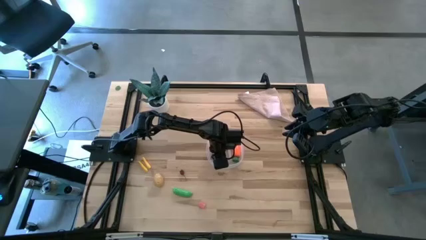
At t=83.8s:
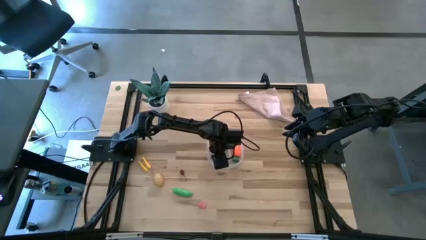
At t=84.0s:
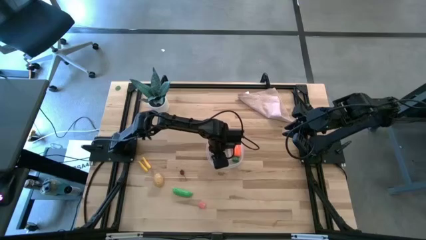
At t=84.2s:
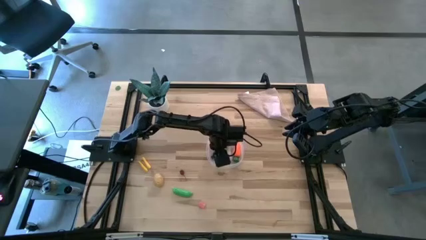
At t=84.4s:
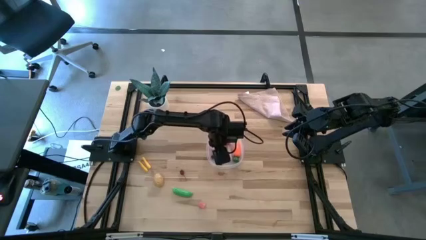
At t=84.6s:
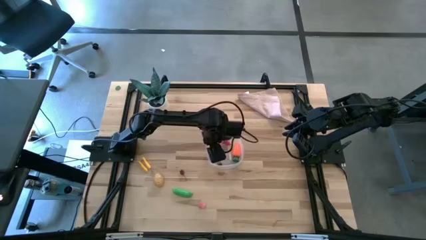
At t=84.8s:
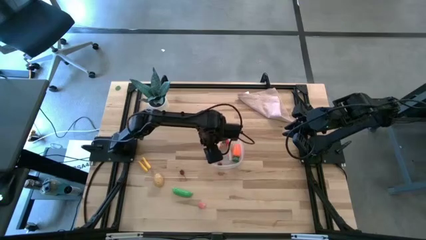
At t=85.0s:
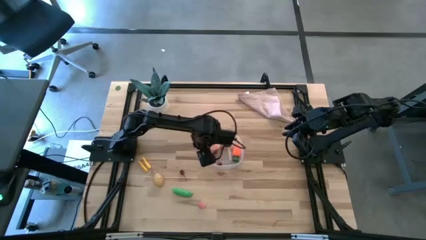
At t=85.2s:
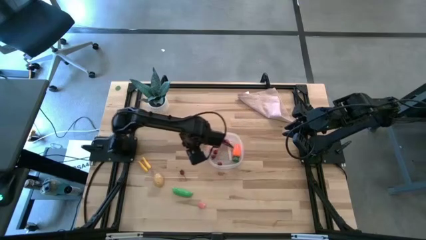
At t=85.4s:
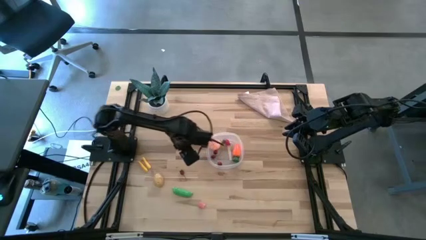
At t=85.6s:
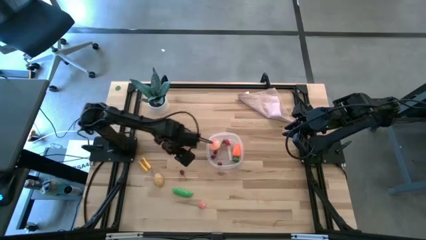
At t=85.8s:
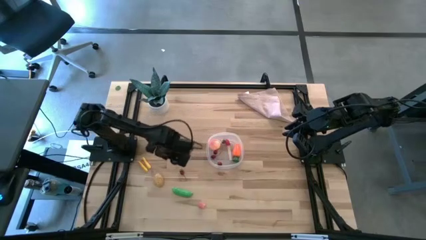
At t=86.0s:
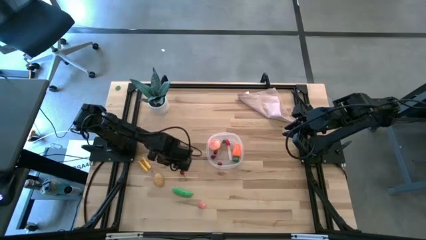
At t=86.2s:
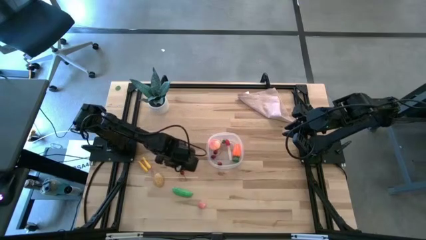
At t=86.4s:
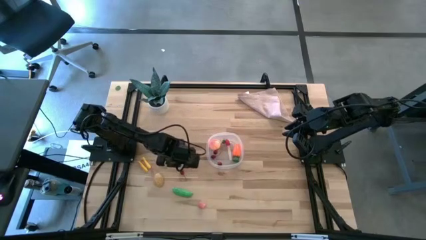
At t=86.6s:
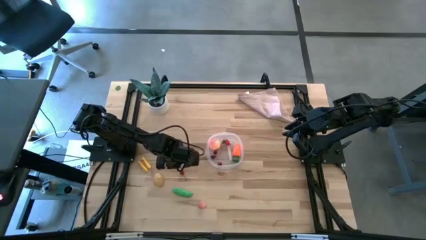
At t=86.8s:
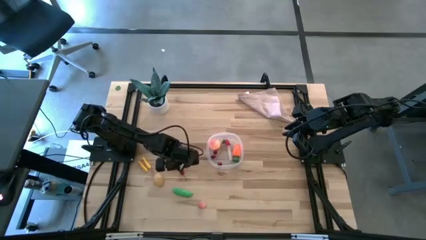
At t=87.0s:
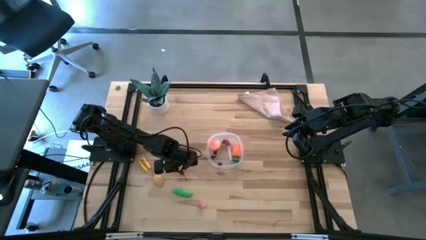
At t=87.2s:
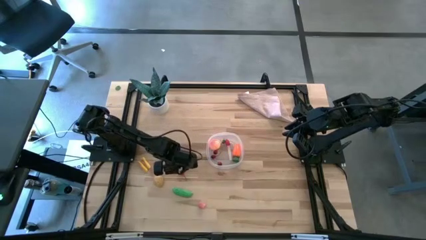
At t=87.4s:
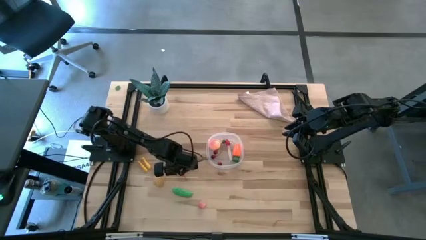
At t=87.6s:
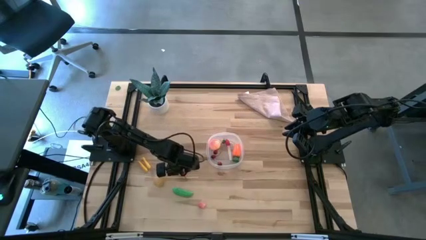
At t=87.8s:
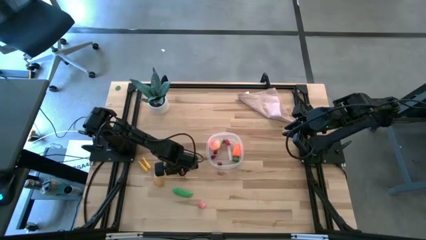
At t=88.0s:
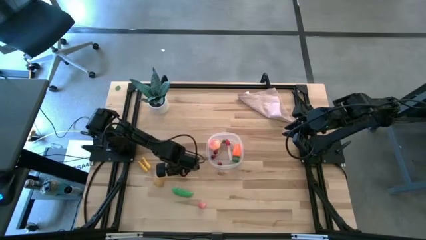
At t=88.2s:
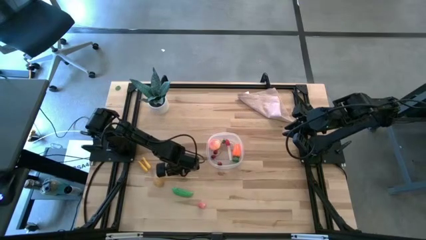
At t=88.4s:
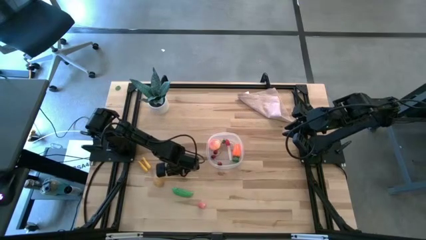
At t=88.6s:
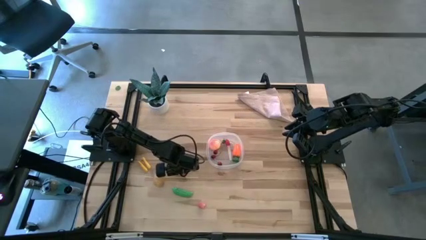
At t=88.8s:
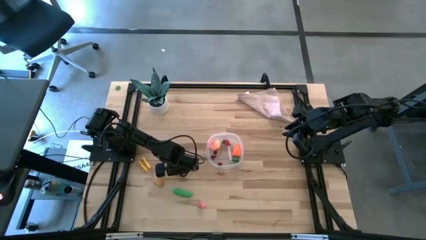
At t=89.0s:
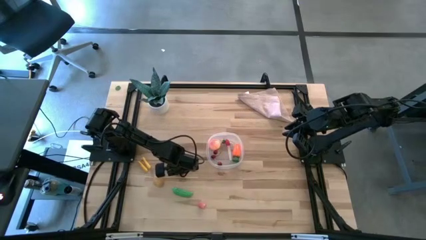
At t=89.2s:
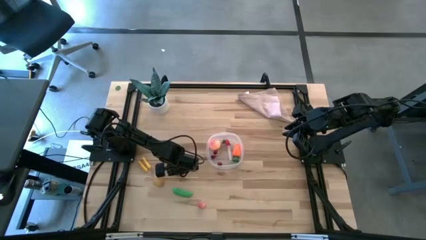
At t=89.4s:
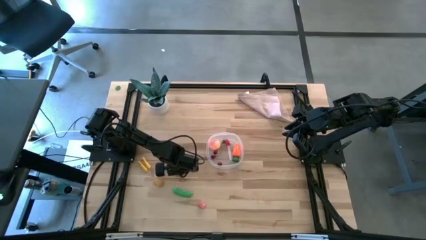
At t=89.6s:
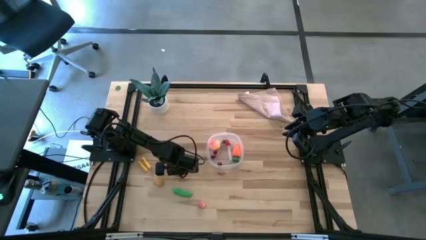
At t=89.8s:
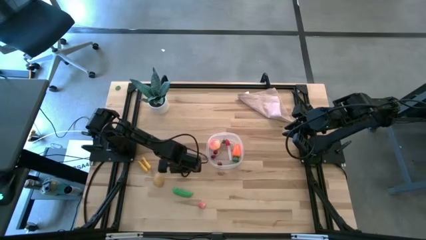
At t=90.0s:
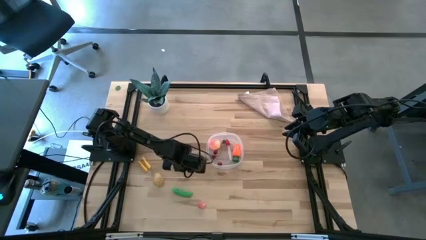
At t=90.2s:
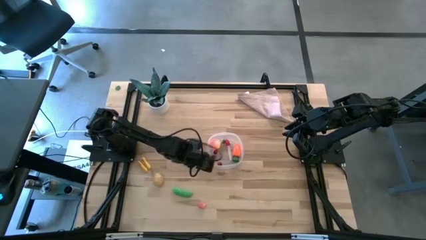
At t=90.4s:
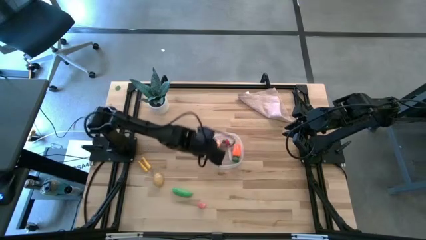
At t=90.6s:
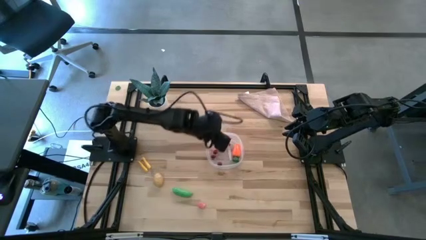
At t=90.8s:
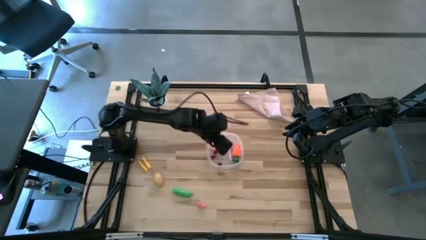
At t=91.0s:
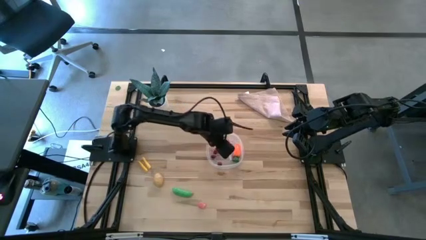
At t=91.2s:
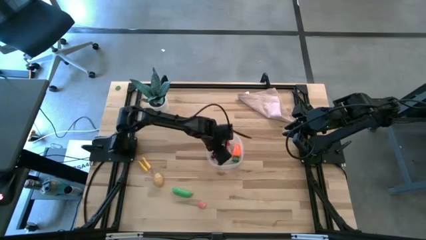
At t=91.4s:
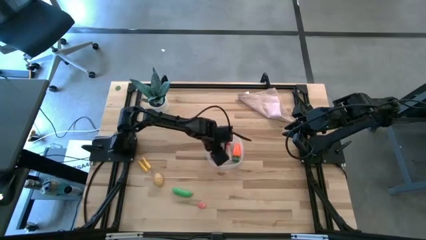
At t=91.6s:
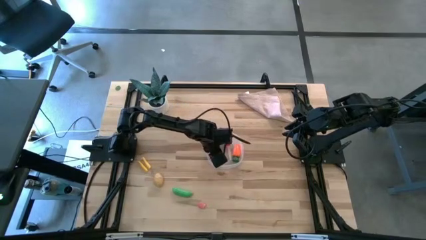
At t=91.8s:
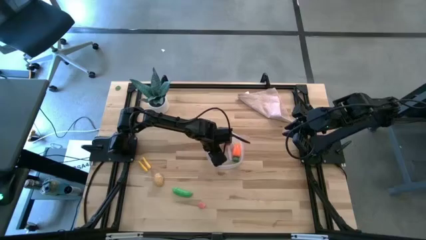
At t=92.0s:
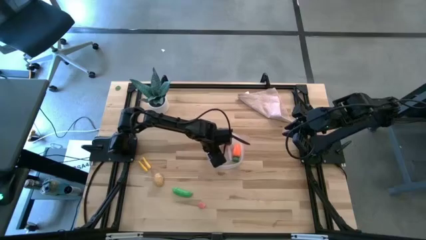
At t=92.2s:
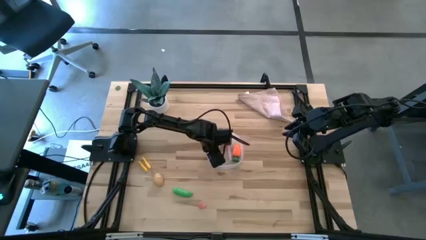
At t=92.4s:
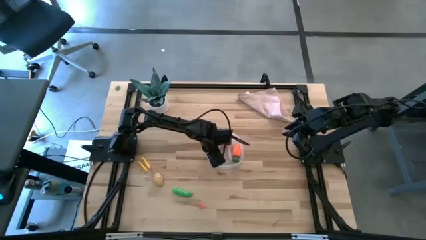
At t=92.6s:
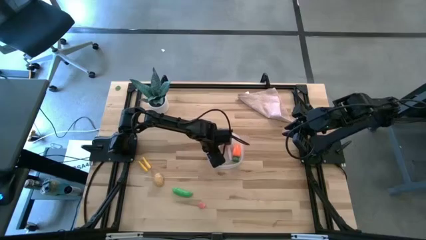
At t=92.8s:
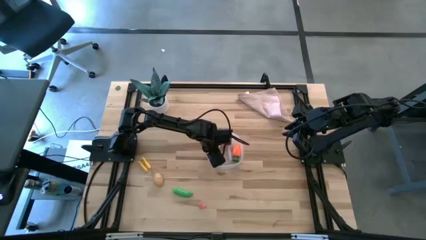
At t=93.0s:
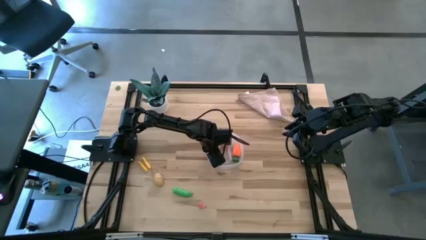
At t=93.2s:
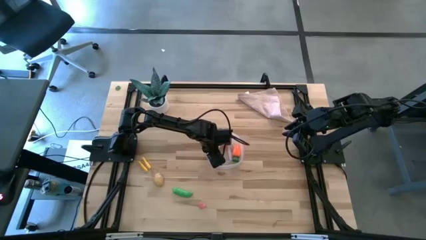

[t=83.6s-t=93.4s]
Task: Pick and placing Produce into tupperware
Put the red cherry into the transparent bin

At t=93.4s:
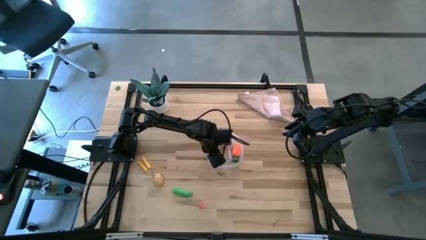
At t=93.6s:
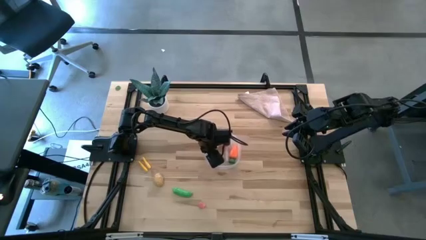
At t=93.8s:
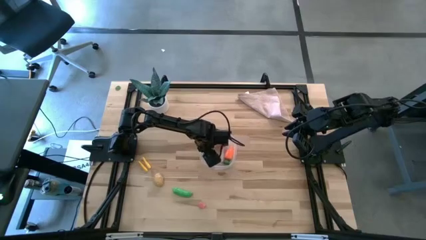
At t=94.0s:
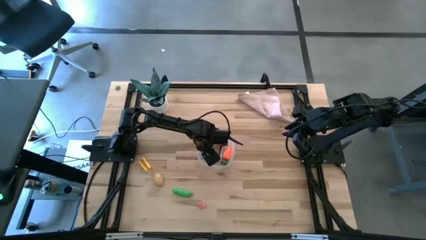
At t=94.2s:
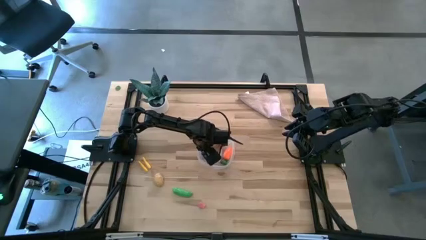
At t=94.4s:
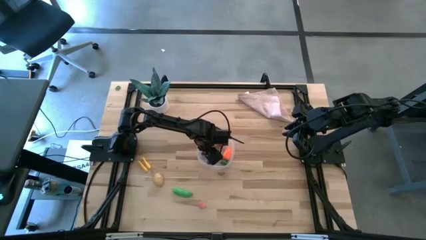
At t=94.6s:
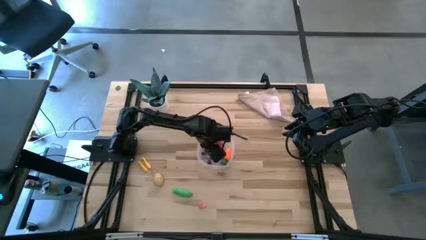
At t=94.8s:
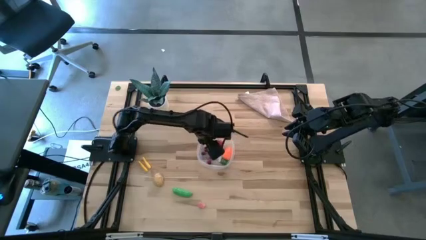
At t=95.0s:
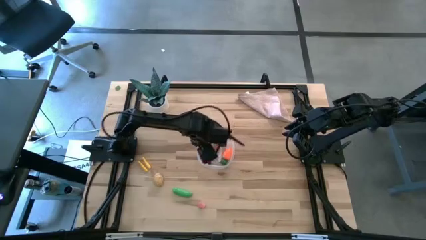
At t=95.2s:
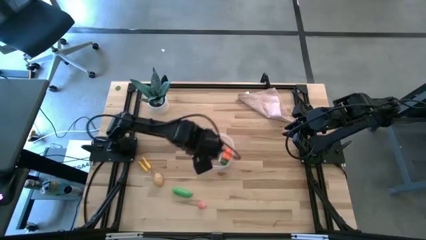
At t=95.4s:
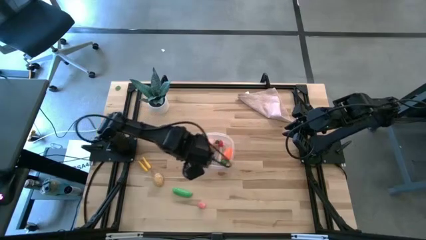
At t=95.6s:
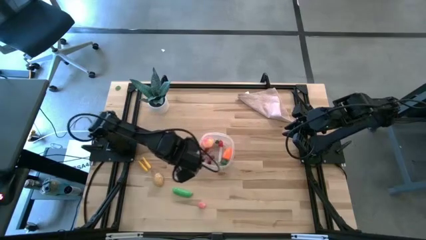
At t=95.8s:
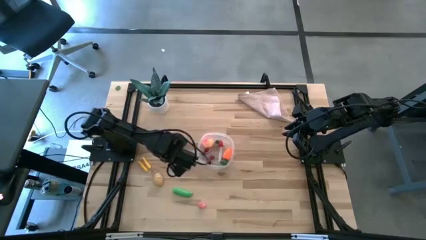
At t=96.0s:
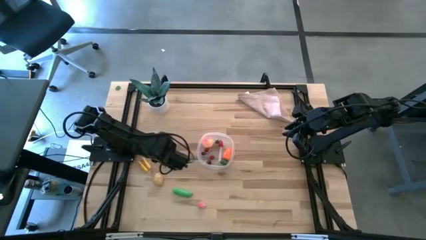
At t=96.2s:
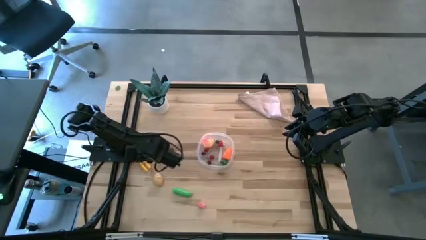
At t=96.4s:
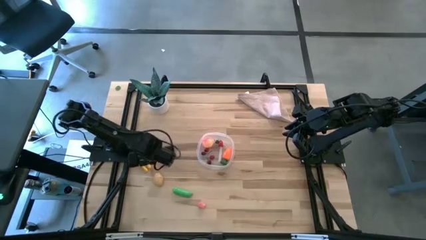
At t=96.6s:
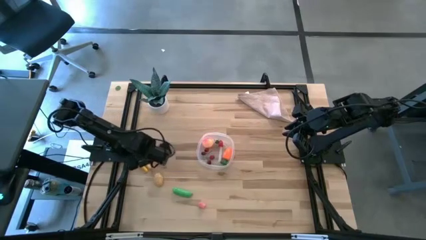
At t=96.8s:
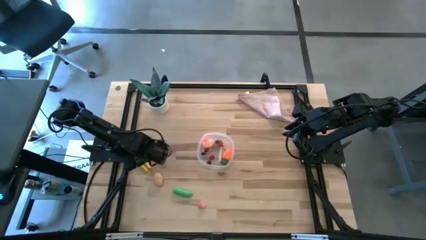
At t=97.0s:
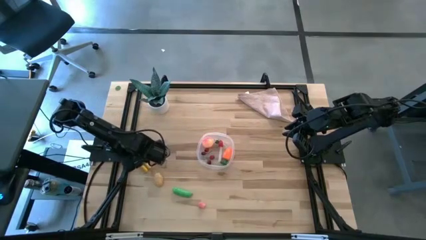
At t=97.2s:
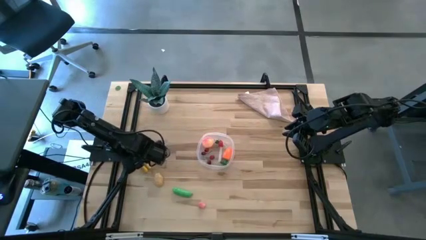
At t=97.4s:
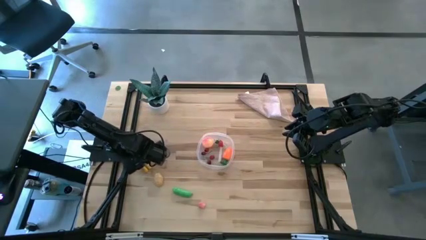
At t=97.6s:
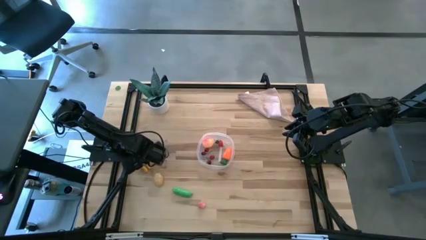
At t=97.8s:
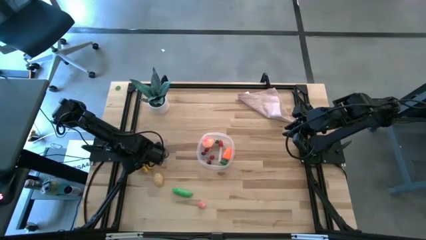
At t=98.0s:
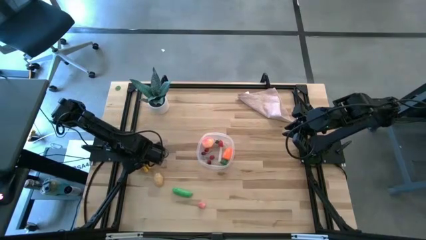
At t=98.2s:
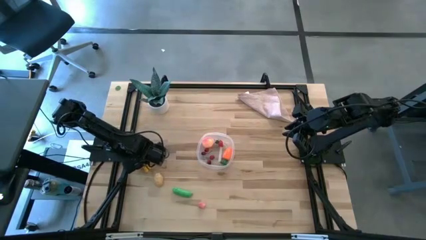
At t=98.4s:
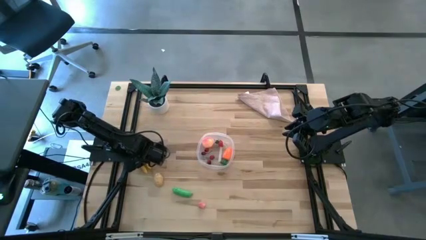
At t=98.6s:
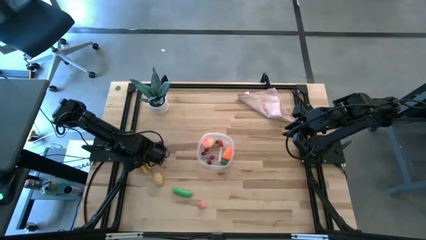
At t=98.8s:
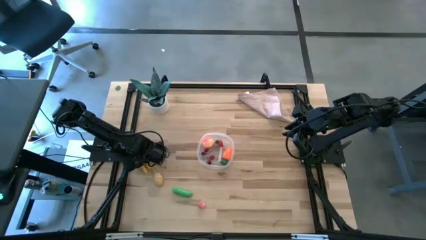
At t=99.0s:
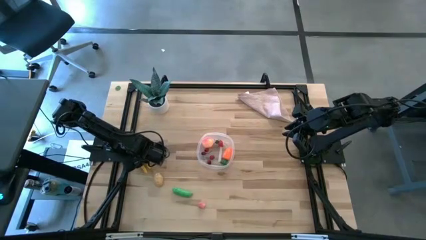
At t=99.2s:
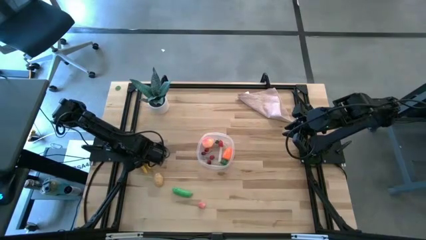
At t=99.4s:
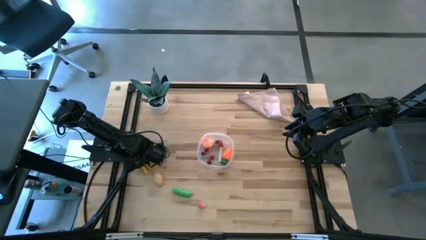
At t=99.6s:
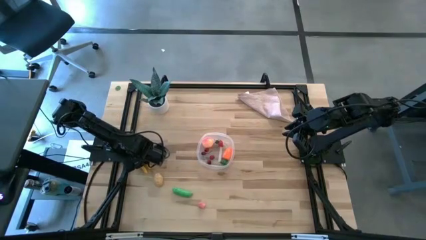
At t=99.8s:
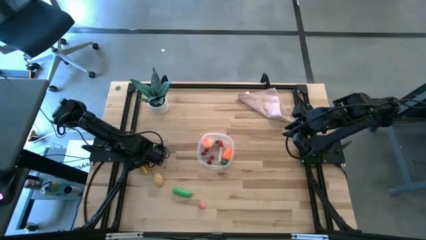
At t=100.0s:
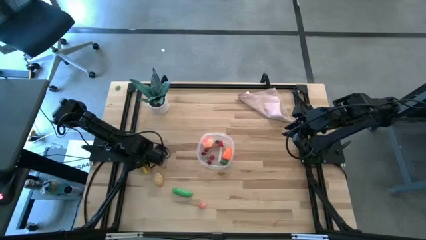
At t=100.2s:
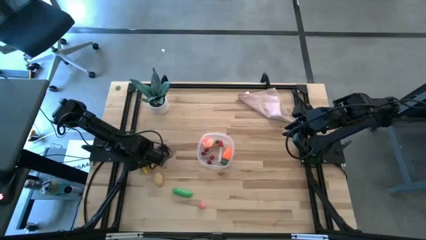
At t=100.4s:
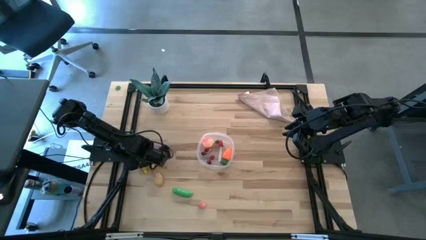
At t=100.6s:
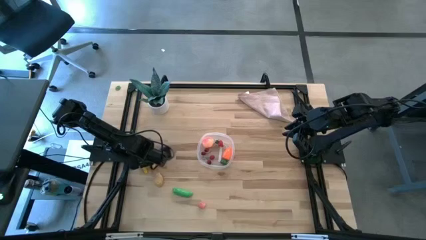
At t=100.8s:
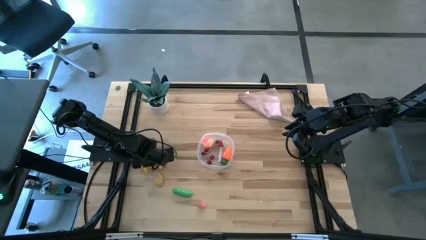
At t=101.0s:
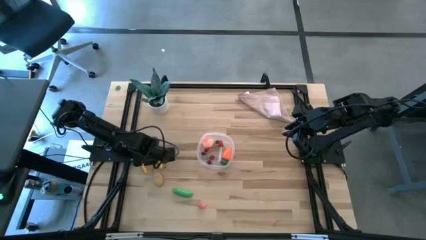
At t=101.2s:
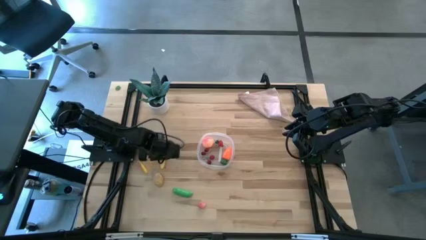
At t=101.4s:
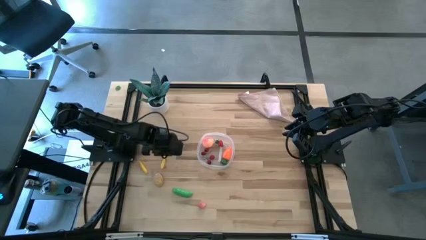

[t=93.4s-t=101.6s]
Put the yellow zucchini into the transparent bin
